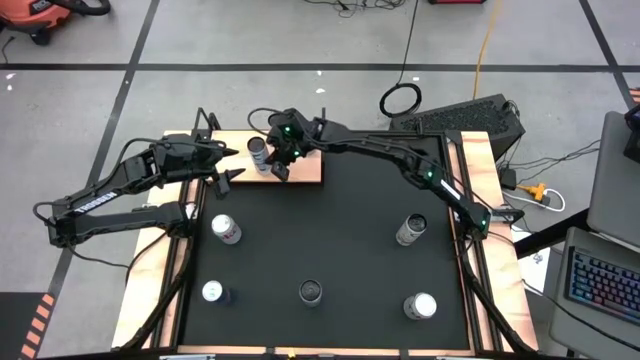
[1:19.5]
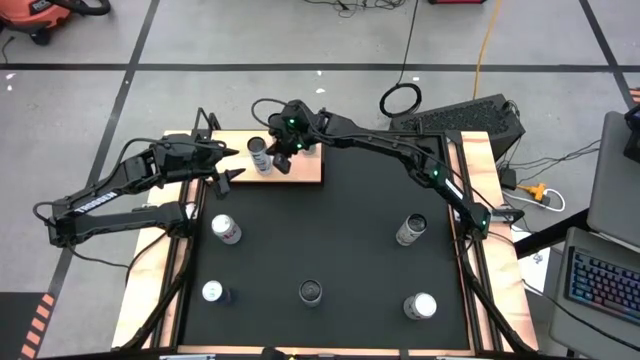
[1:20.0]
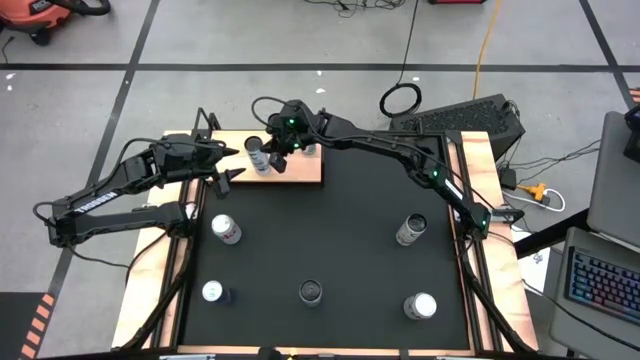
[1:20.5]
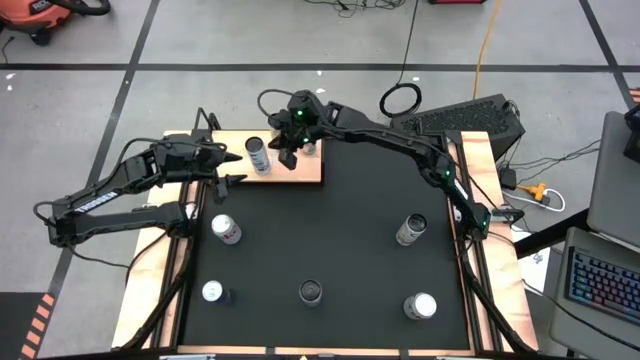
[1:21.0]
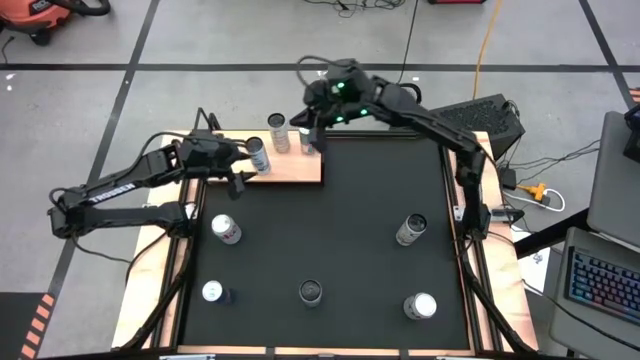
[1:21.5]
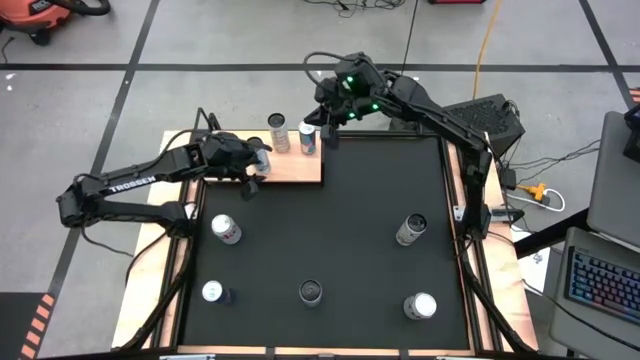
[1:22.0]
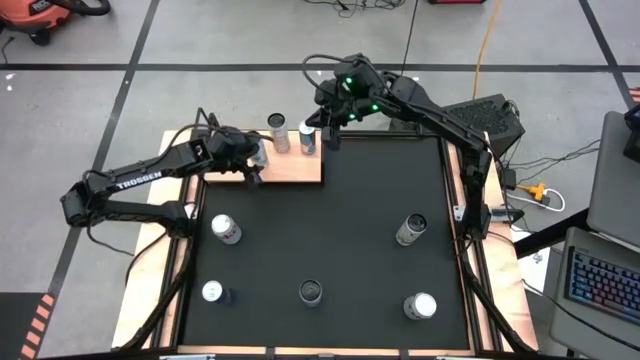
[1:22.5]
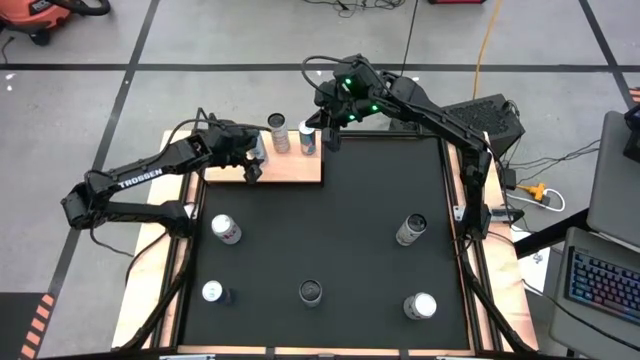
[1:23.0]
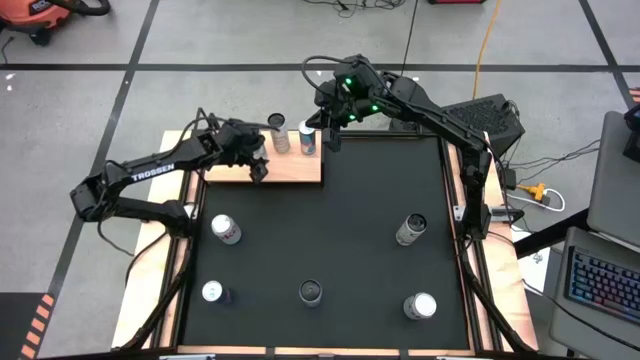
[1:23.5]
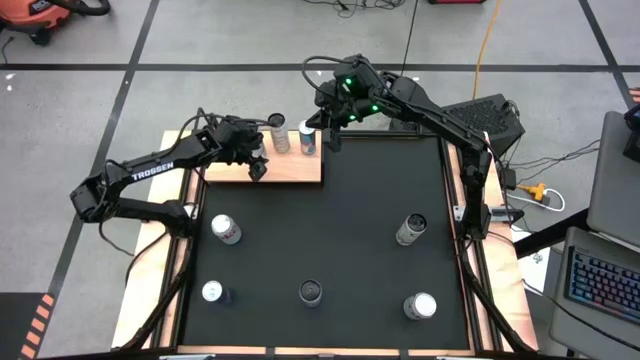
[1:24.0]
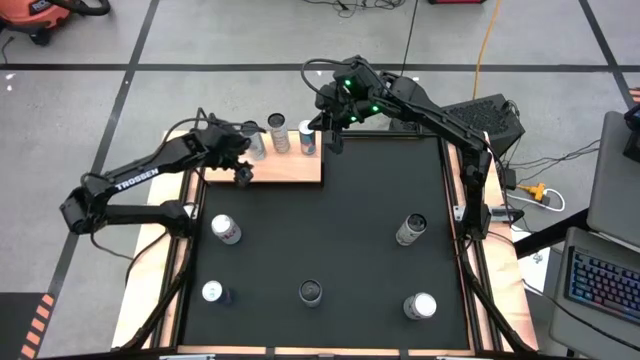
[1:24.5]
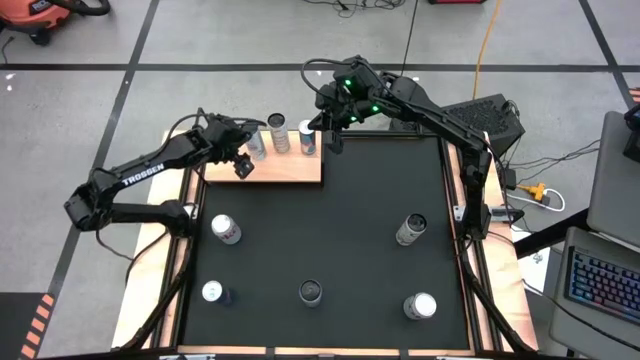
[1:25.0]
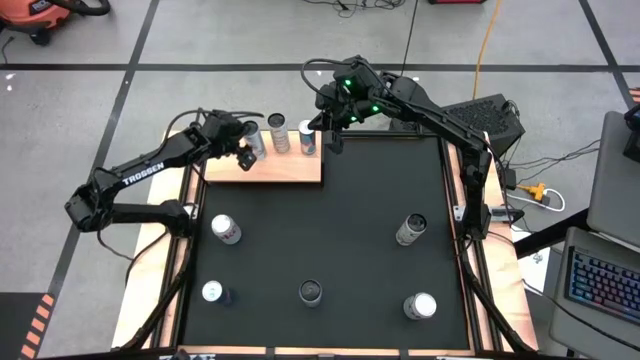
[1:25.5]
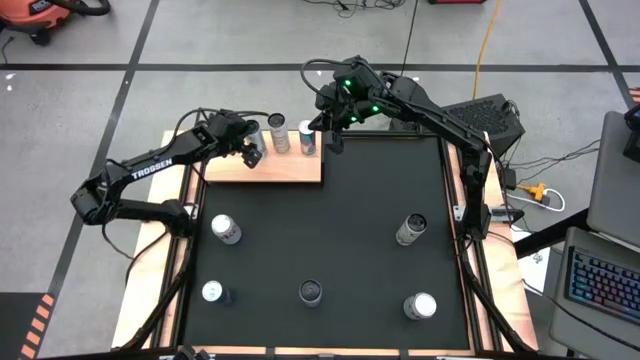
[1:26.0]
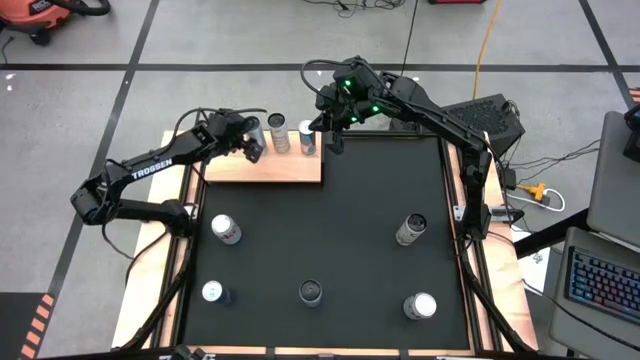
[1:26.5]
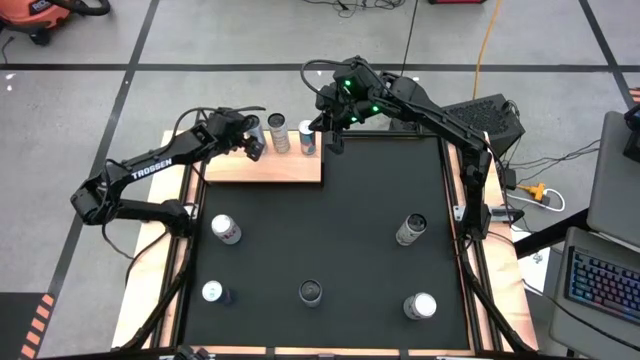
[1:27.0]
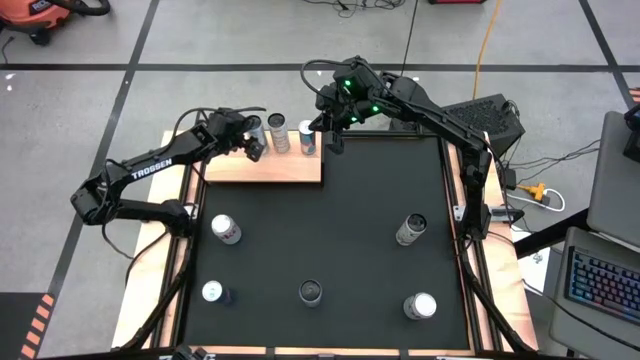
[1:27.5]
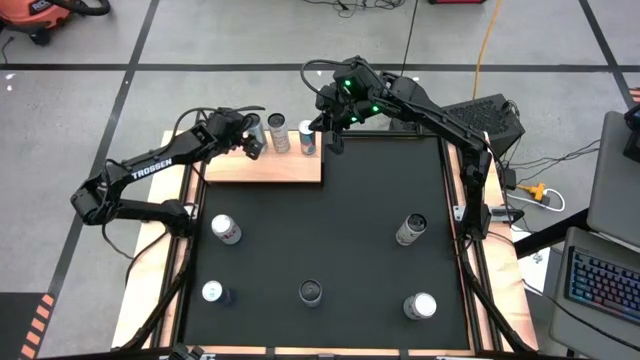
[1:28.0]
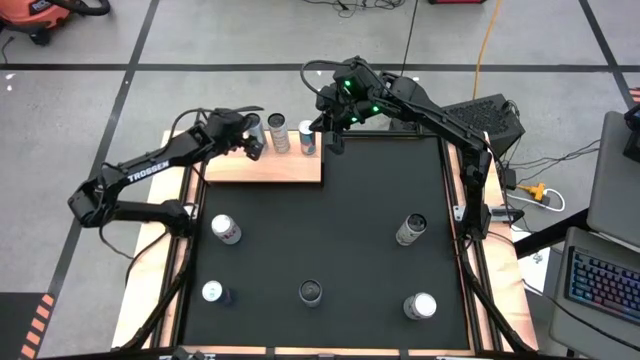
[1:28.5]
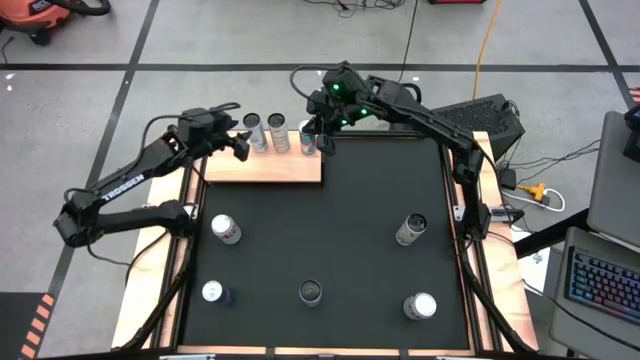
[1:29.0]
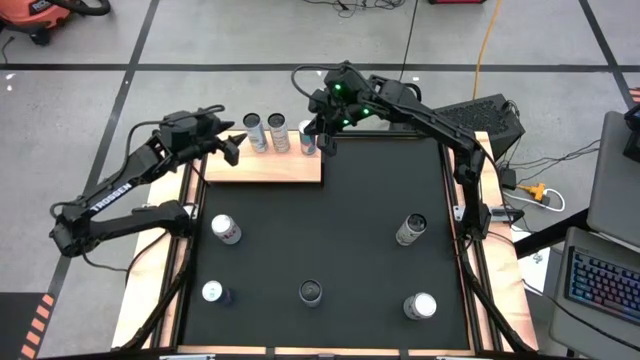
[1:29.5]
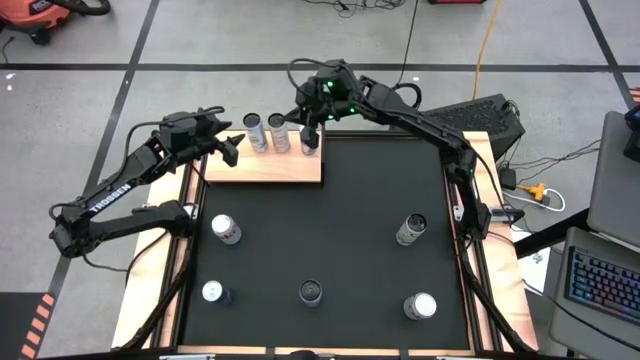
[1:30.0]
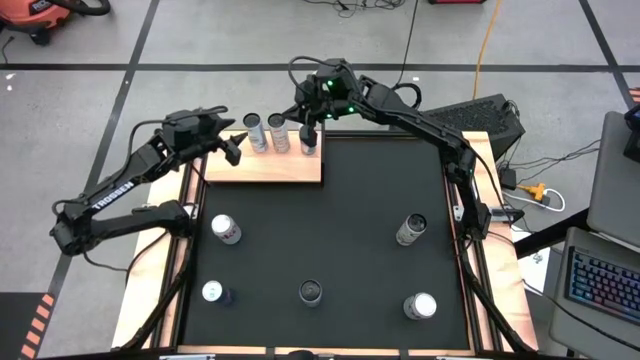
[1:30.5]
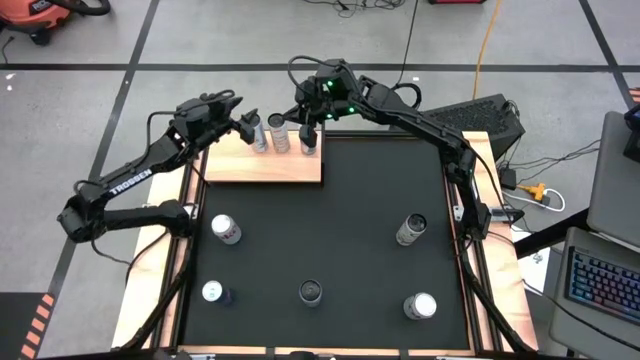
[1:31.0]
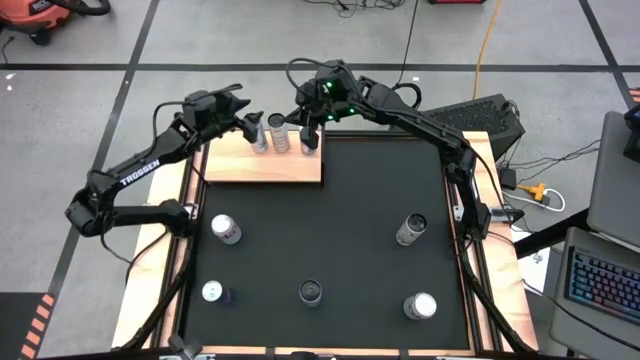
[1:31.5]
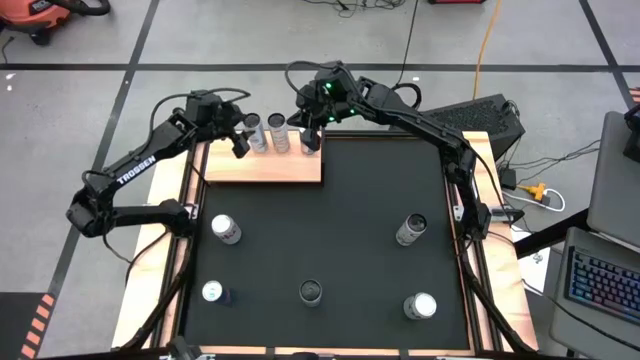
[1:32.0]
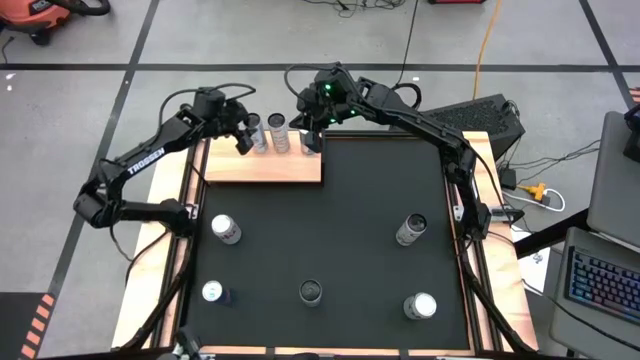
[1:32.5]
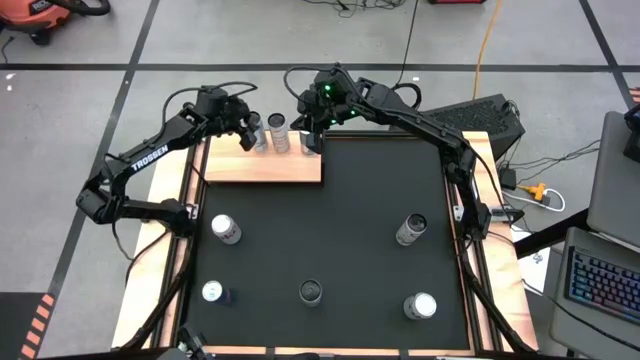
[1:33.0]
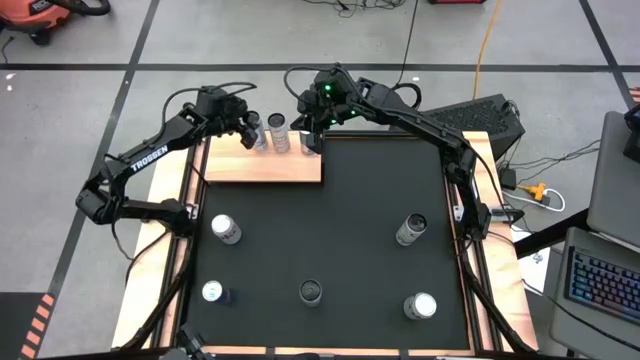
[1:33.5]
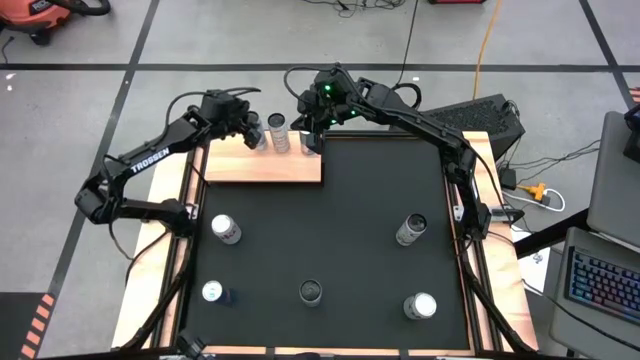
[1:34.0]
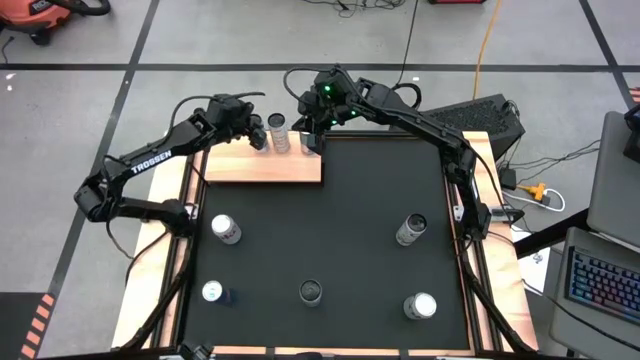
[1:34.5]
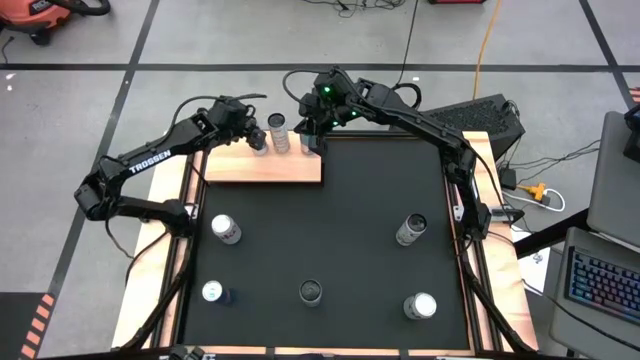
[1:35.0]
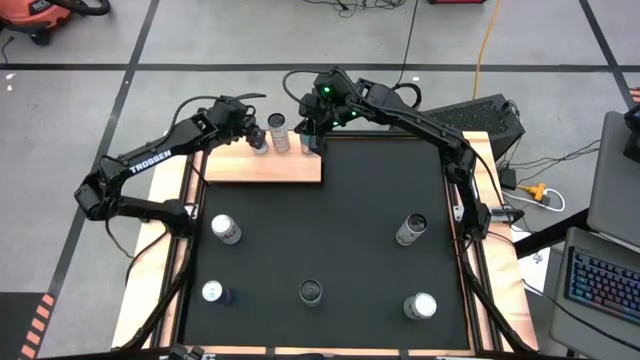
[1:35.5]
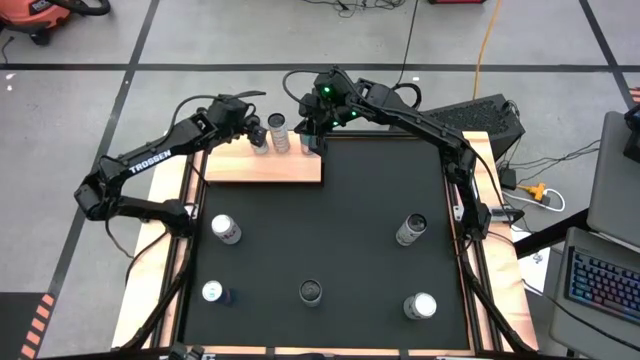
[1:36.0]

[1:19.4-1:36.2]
Task: Place canned beverage on shelf
Put the top white blue soda can on the shelf

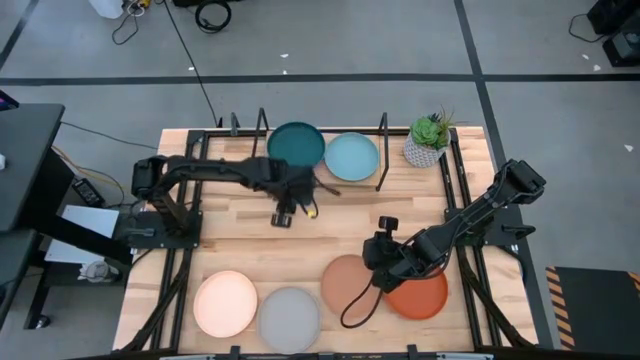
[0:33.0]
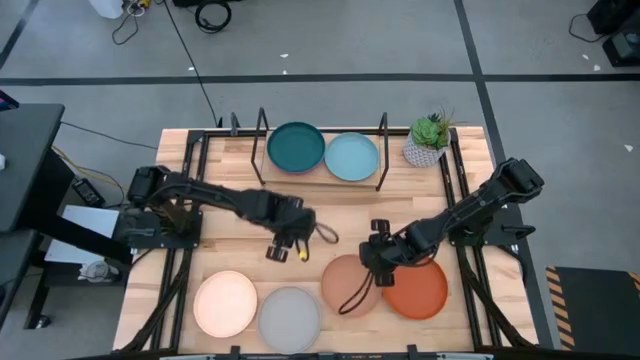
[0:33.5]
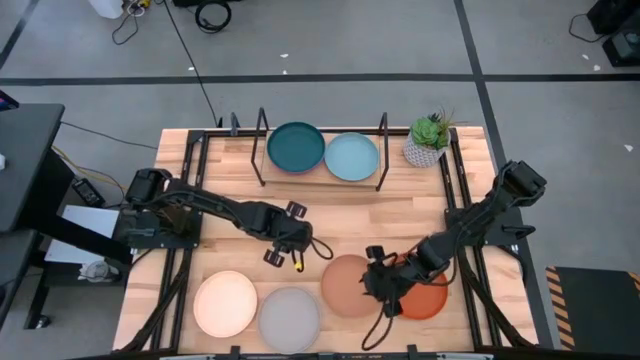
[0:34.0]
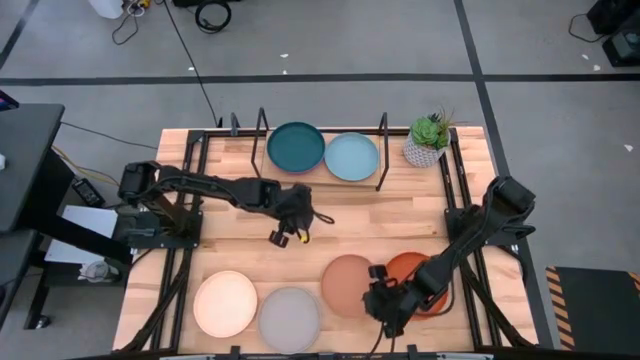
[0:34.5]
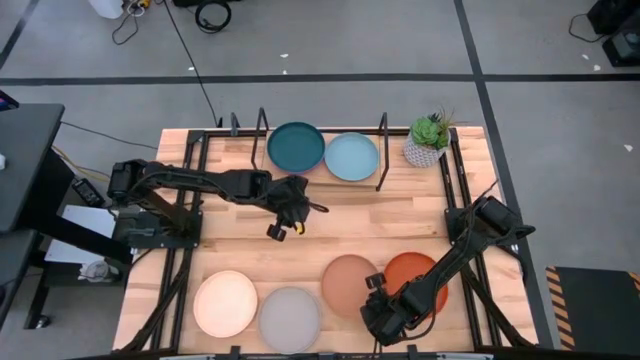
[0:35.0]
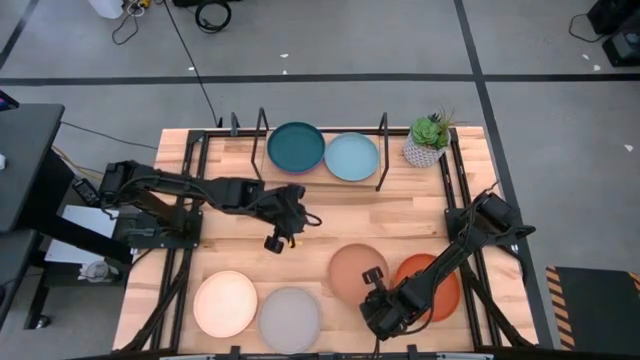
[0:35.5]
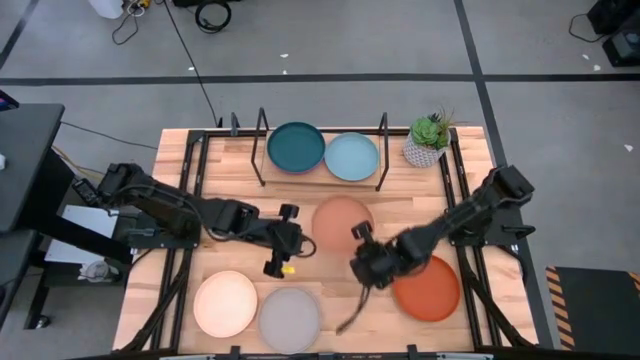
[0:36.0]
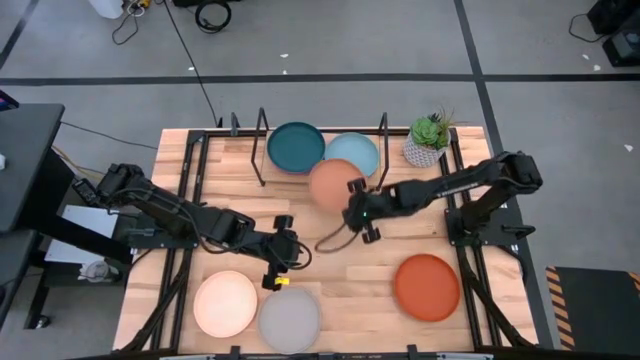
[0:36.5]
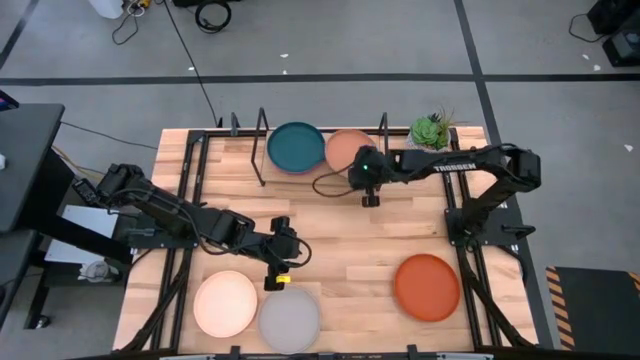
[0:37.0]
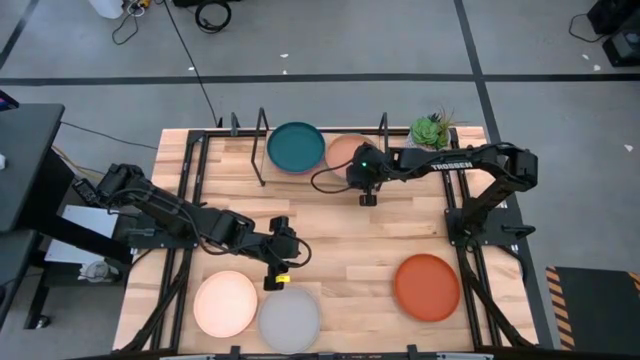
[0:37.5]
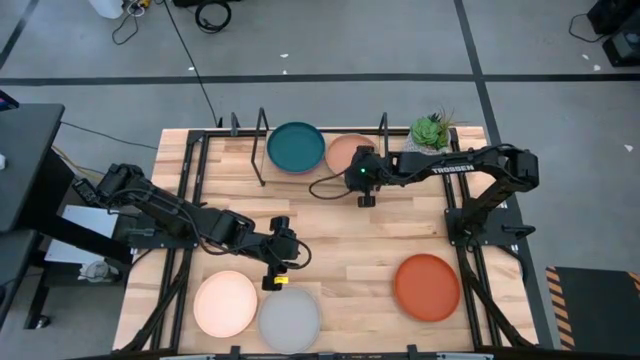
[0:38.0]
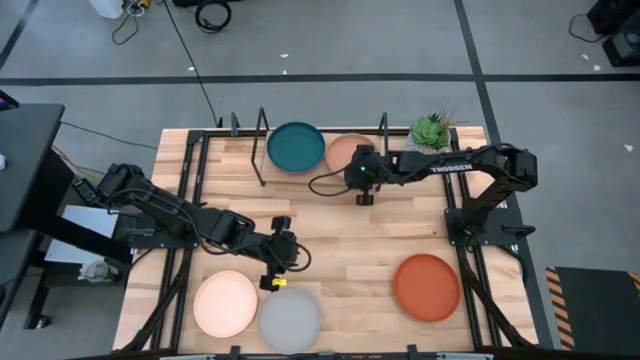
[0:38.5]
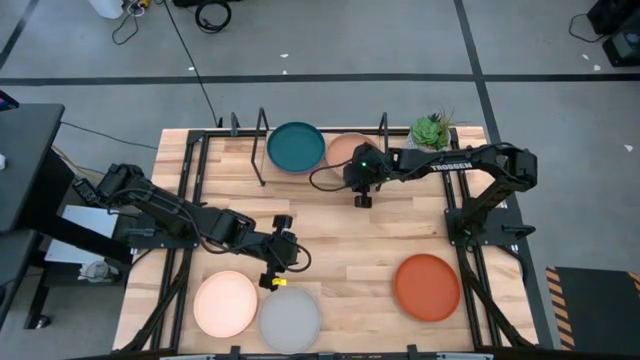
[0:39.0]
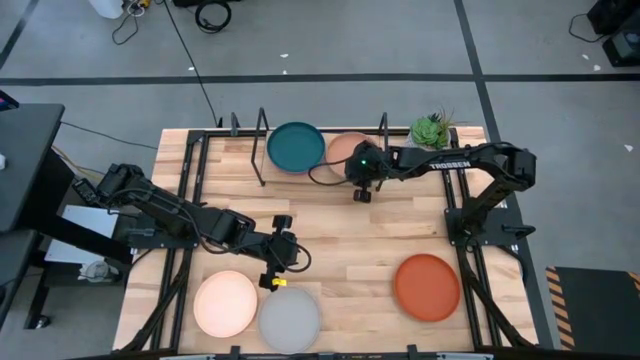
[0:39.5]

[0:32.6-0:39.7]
Task: Place and stack plates onto a shelf
Stack the brown plate on top of the light blue plate on the shelf
